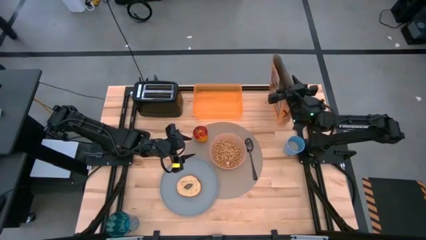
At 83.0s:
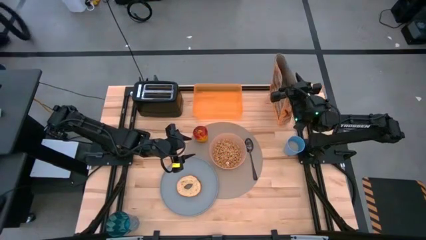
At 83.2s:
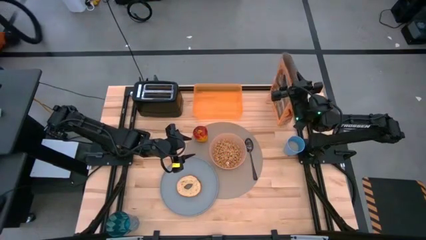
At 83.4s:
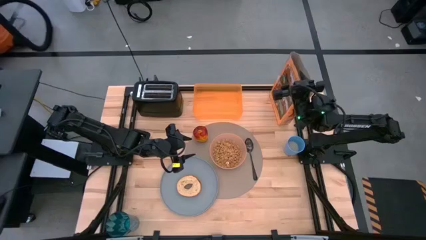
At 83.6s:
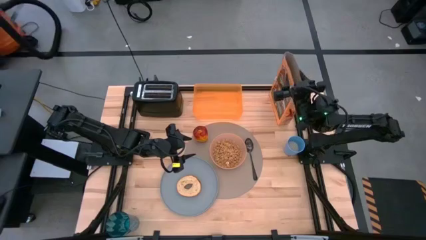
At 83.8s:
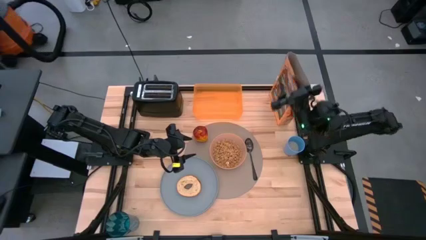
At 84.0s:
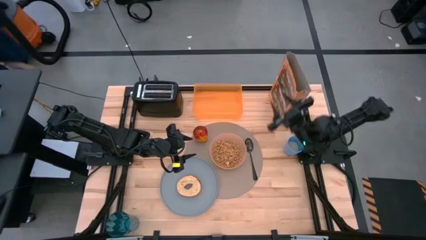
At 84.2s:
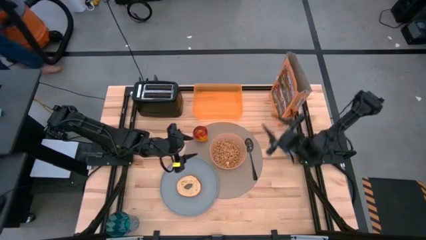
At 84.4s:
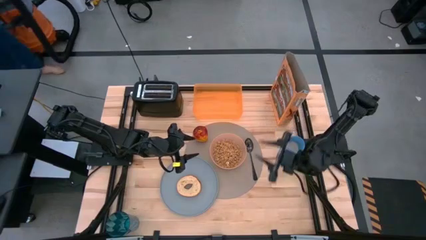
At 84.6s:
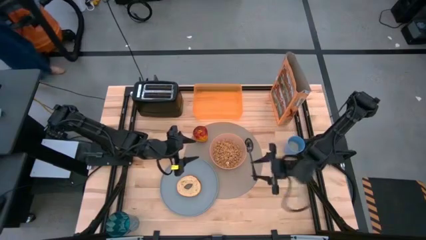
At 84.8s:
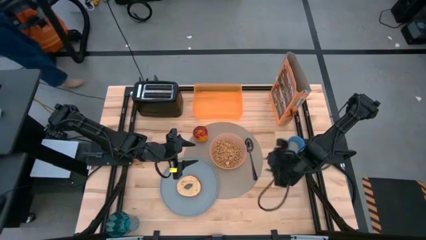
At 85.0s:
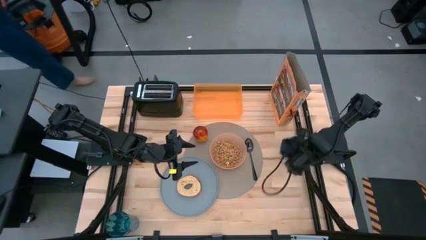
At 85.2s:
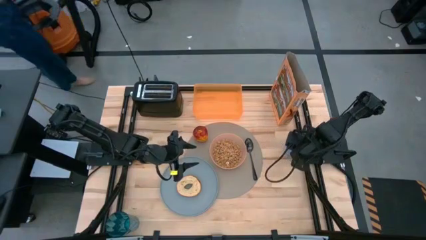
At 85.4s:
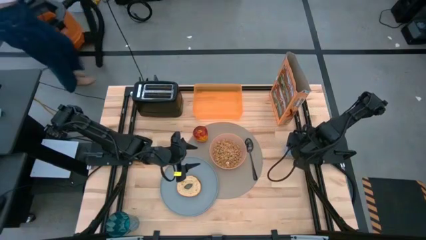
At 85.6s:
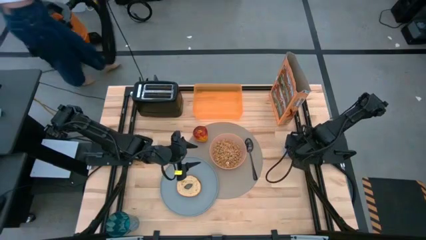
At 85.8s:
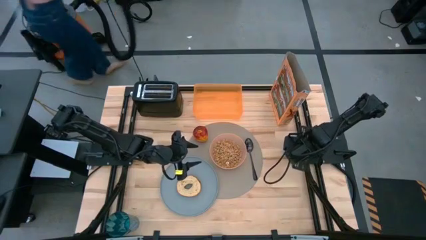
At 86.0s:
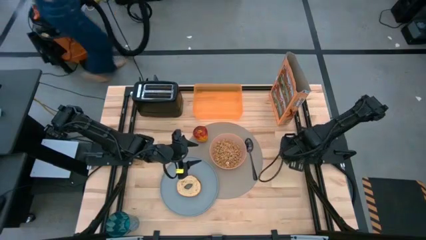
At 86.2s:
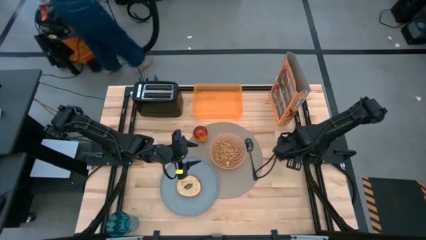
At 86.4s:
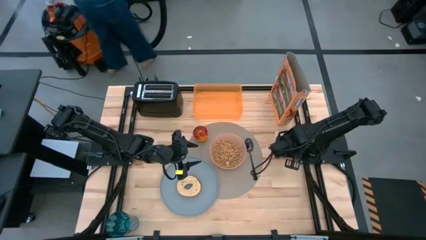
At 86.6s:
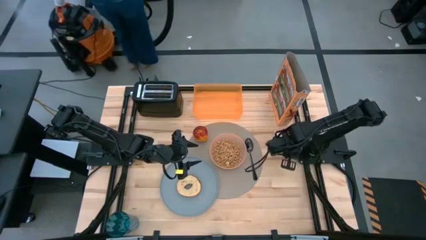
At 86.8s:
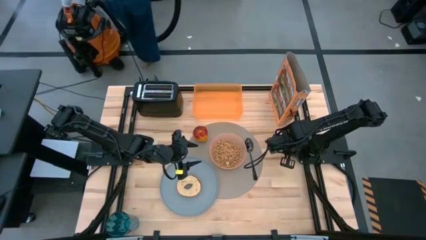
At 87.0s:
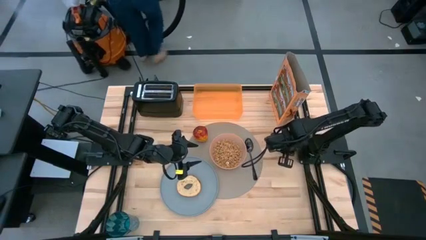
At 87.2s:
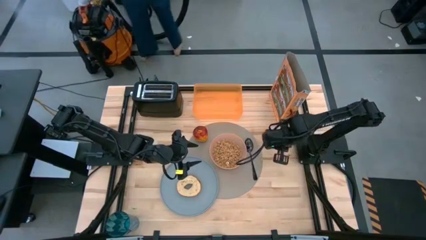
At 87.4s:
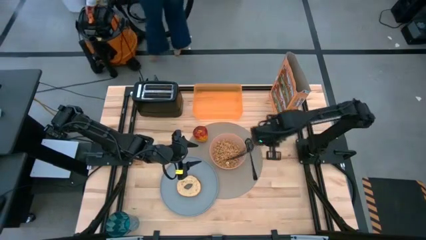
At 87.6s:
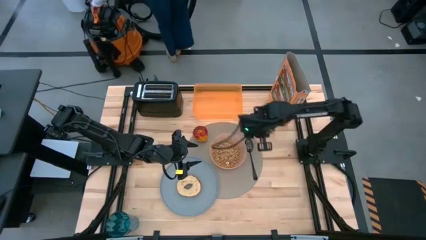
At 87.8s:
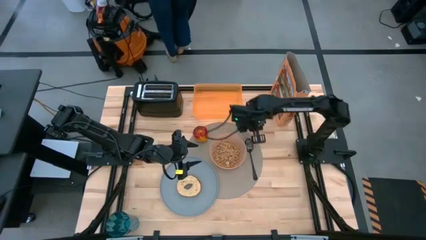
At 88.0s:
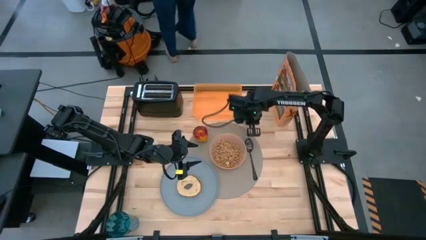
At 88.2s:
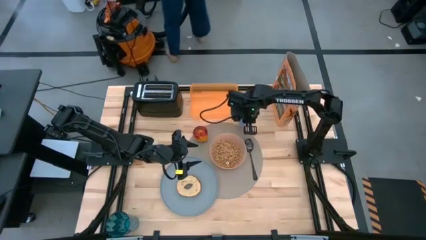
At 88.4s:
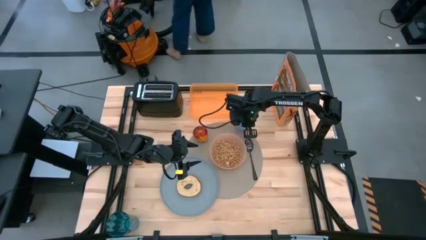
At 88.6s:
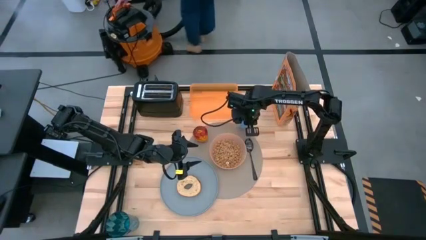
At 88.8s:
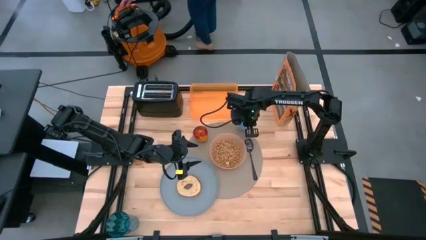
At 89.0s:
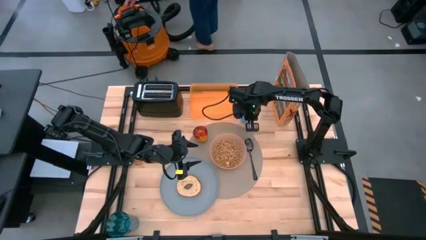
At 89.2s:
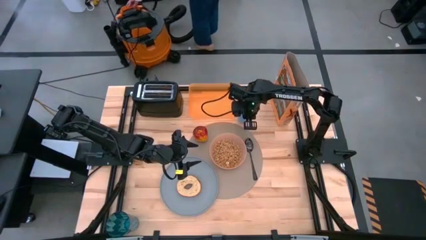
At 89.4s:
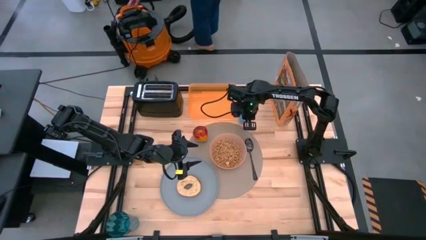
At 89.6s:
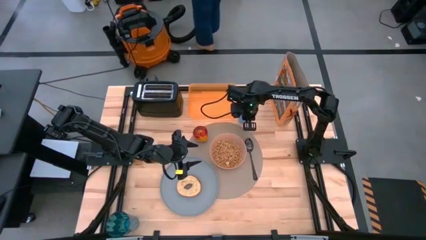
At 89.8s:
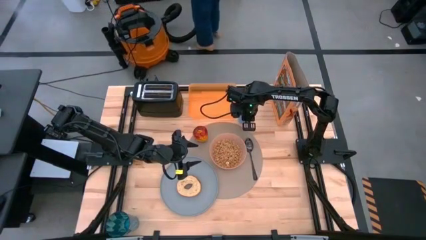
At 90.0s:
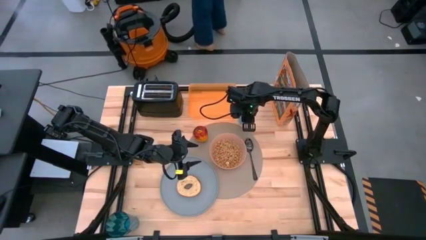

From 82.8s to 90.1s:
Task: Arrange a breakfast setting
Move the blue cup to the top right of the brown table mat

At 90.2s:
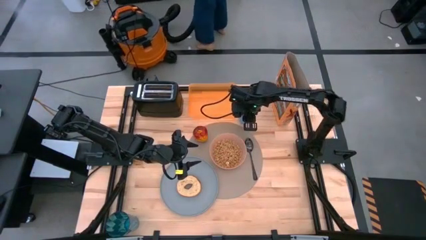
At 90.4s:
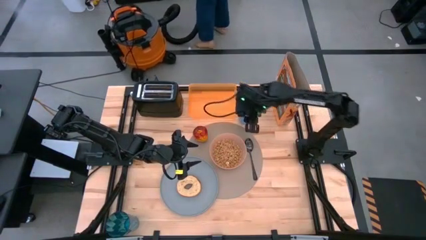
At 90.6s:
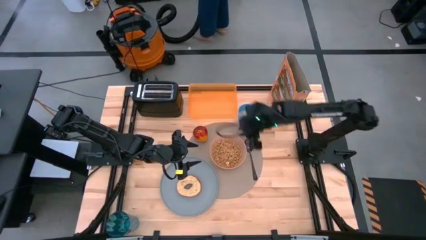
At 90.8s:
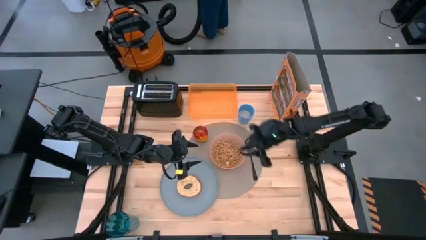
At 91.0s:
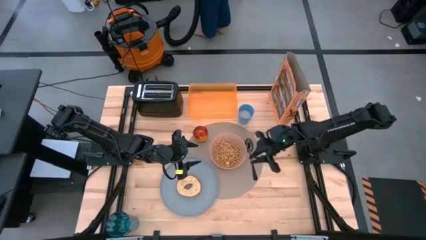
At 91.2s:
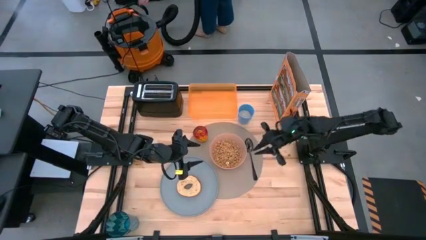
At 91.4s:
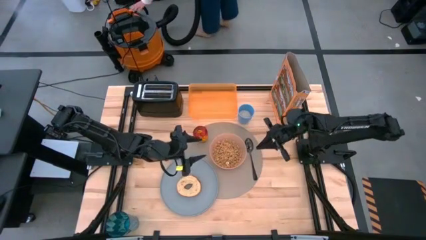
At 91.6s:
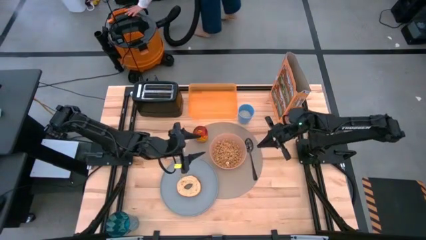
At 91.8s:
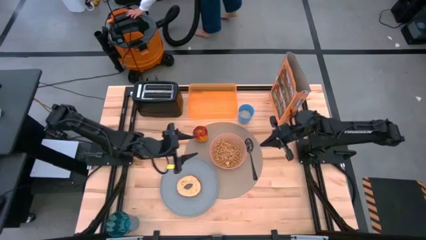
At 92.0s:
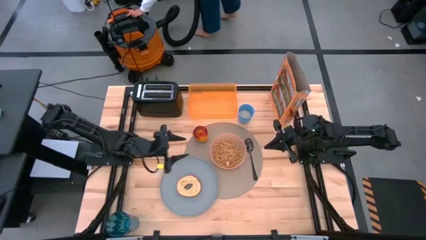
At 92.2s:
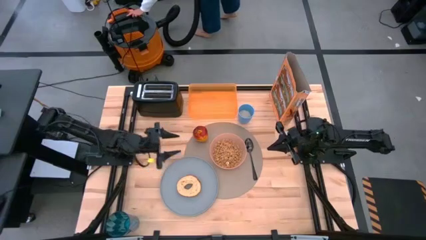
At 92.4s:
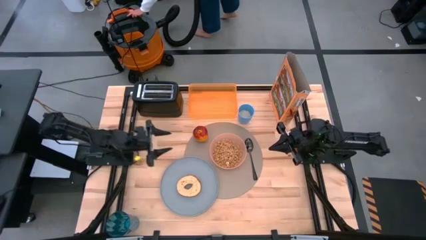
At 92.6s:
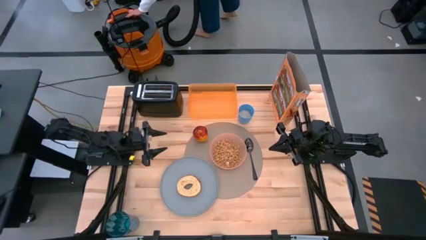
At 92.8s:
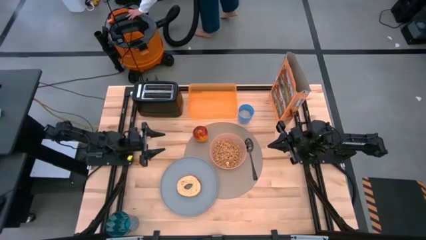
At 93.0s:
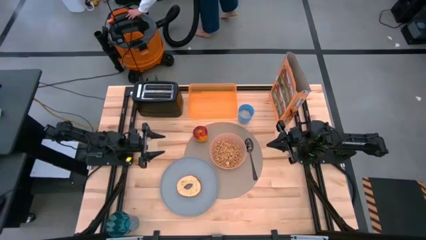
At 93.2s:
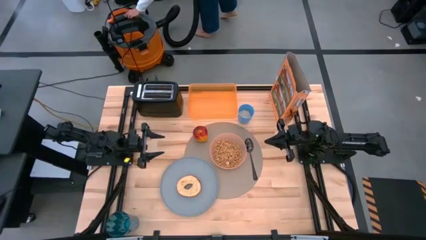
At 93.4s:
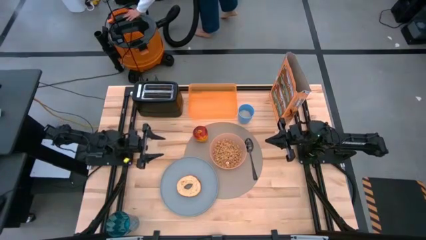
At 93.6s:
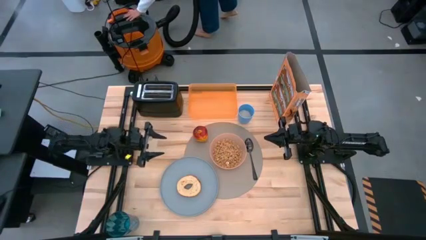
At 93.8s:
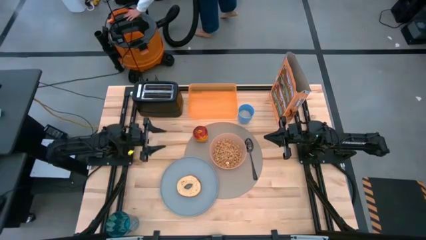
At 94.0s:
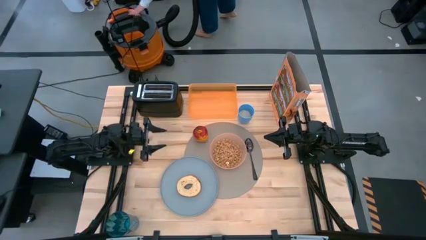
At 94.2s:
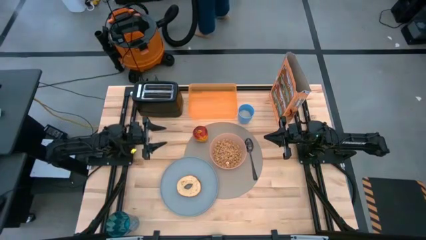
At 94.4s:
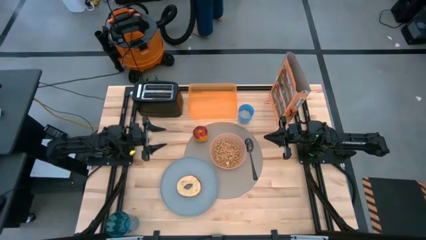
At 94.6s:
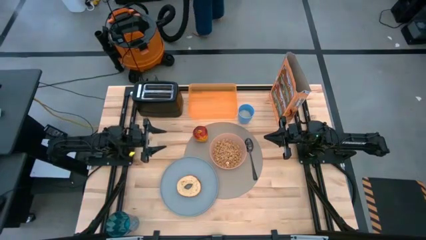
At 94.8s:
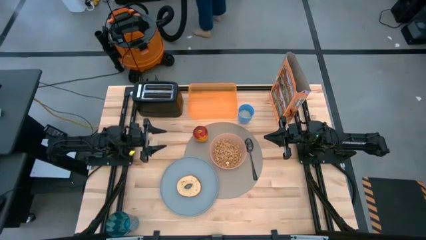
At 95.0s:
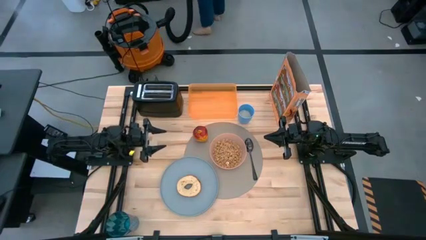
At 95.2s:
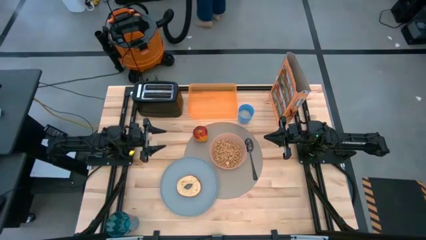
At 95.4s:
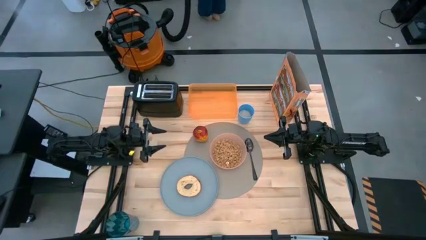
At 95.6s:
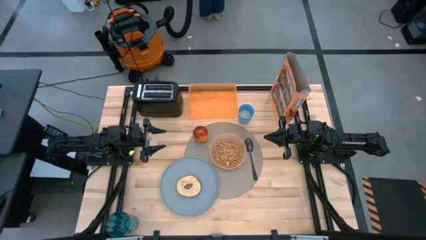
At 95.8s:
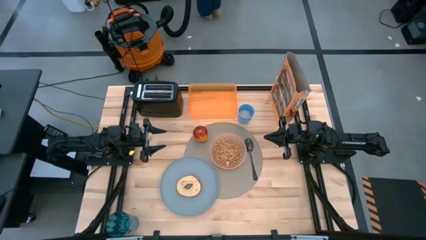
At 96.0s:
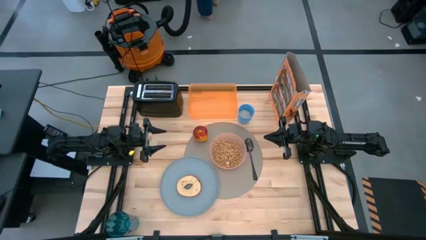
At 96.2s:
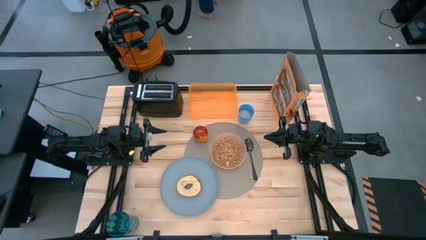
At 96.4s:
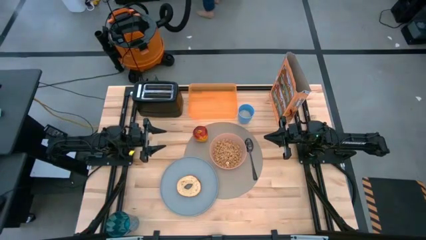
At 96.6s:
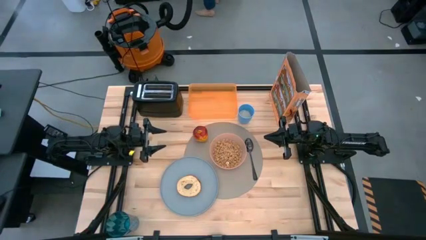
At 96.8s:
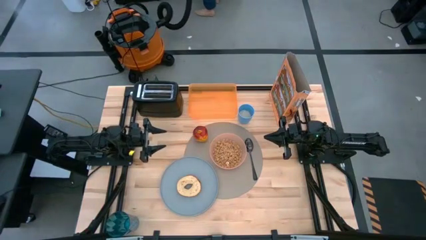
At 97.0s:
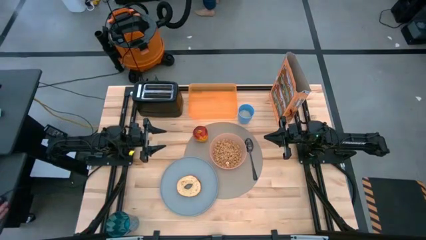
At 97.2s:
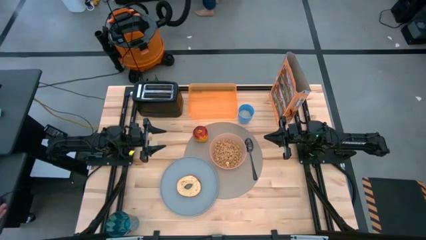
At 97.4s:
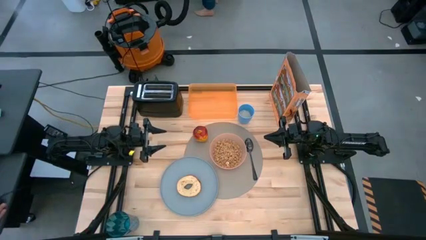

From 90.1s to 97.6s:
Return to Home Position

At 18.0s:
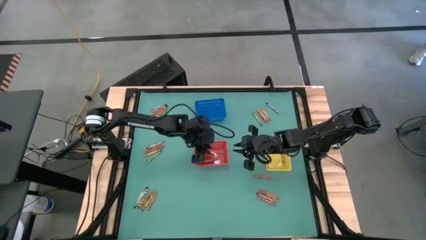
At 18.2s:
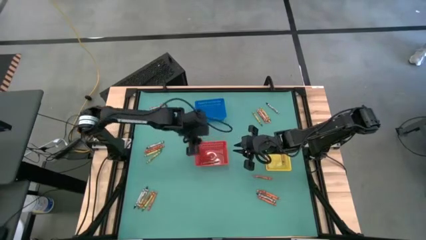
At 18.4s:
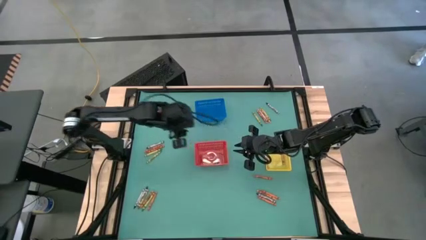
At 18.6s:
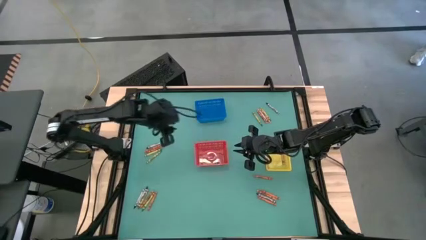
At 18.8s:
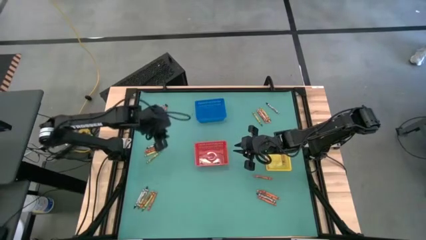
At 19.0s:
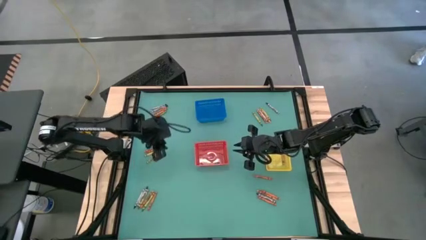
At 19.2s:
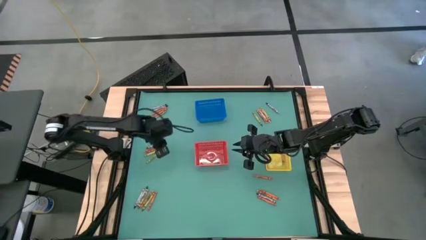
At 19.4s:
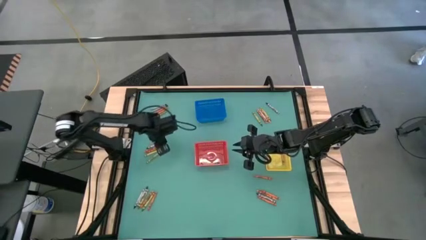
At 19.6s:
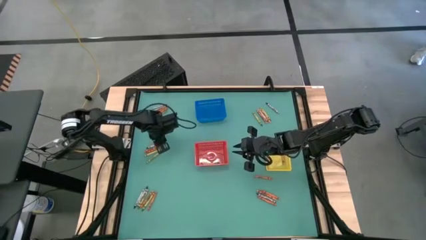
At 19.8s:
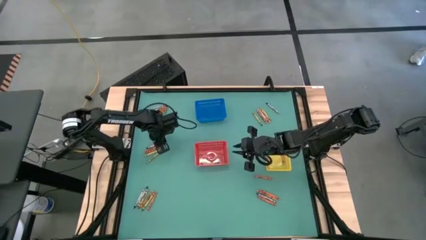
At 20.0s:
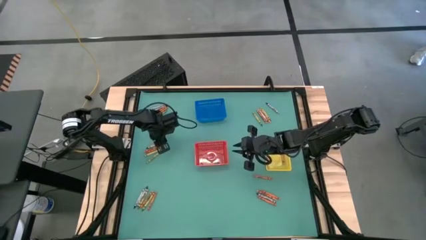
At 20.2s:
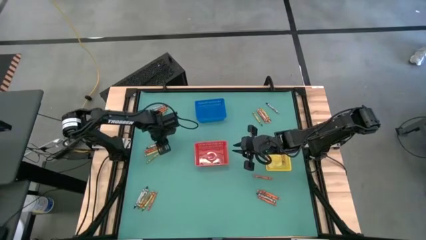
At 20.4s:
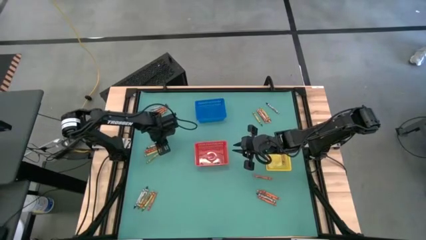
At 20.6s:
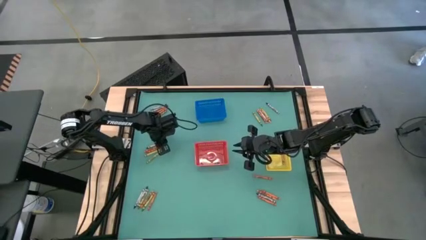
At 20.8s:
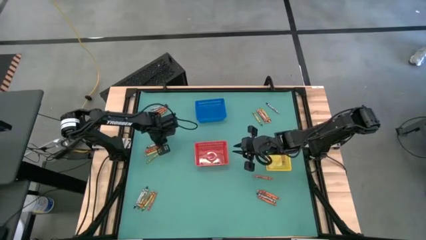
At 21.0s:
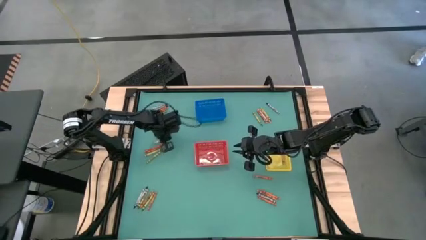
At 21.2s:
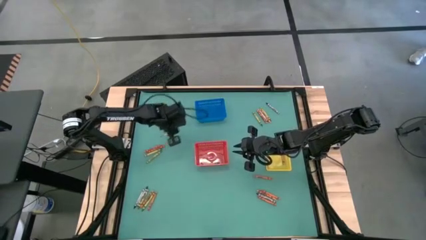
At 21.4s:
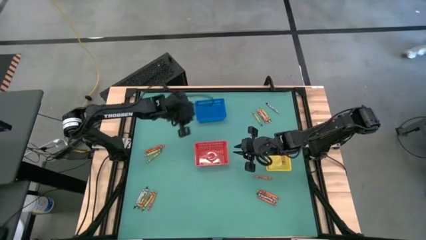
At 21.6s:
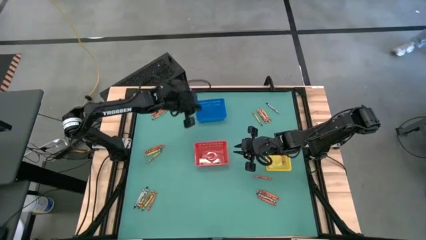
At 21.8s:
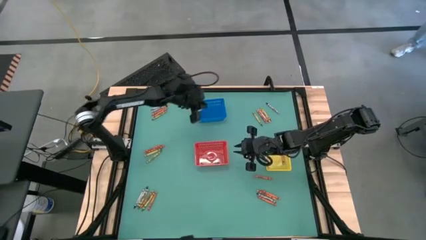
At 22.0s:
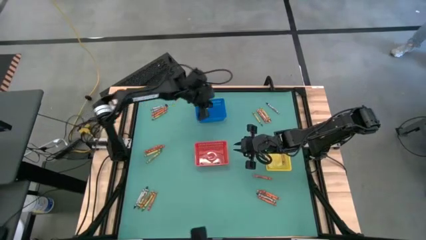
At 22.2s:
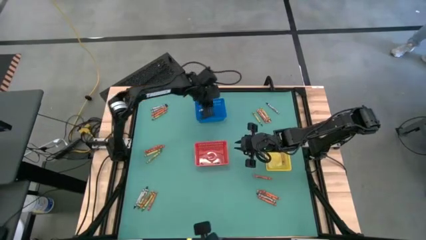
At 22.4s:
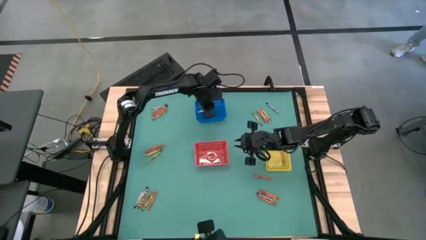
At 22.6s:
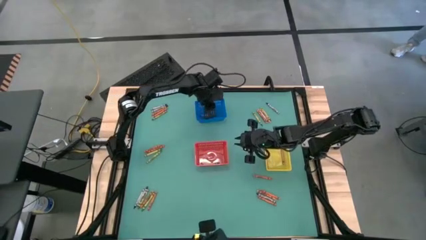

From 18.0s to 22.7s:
Task: Sort crayons
Put the black crayon into the blue bin
